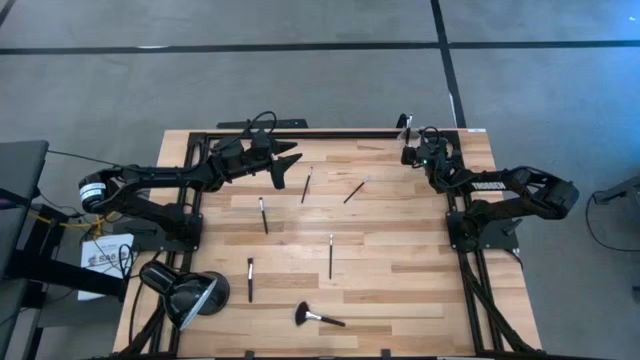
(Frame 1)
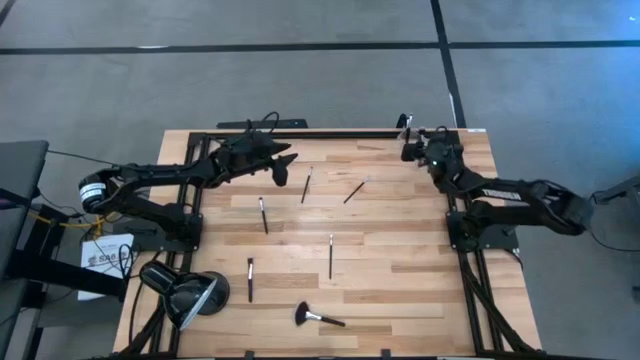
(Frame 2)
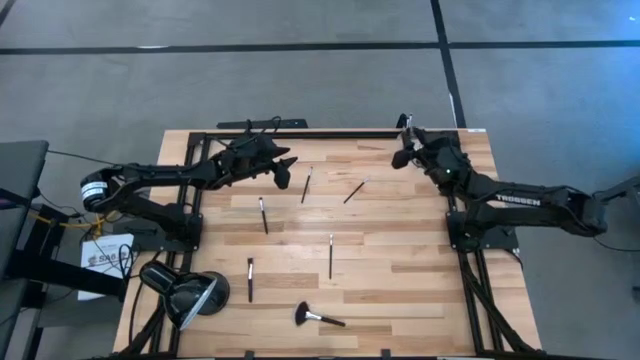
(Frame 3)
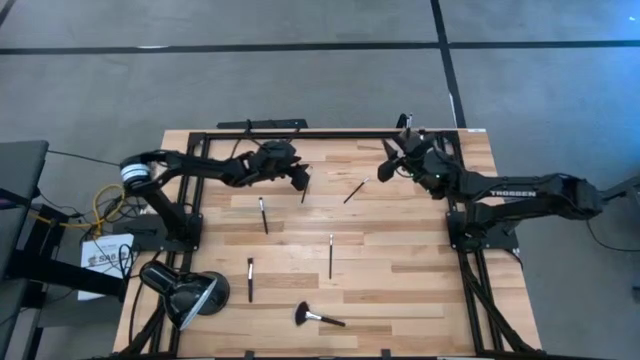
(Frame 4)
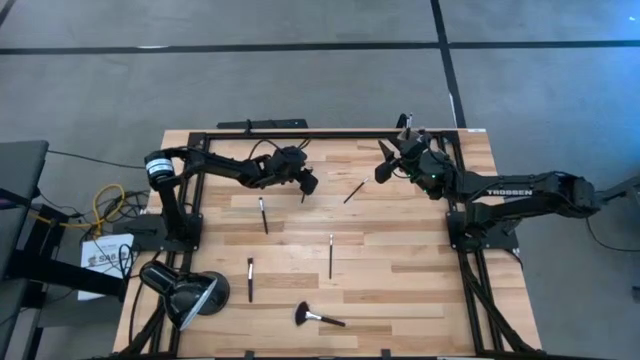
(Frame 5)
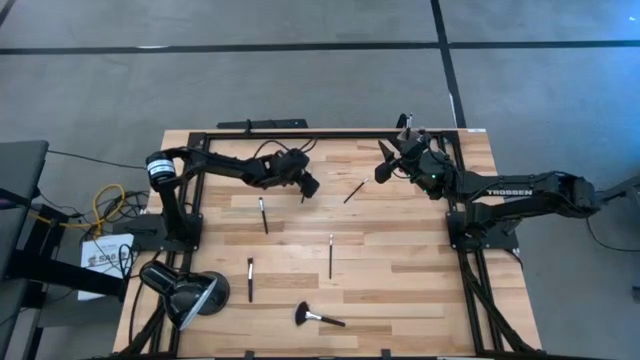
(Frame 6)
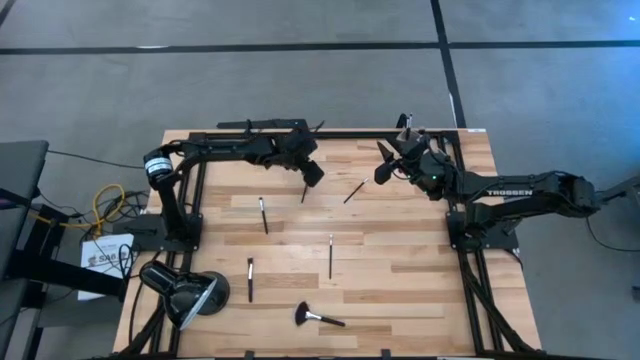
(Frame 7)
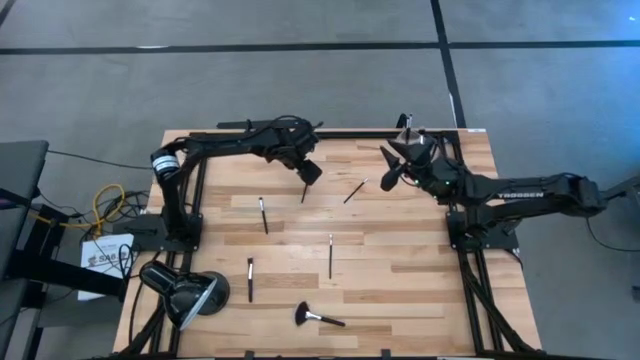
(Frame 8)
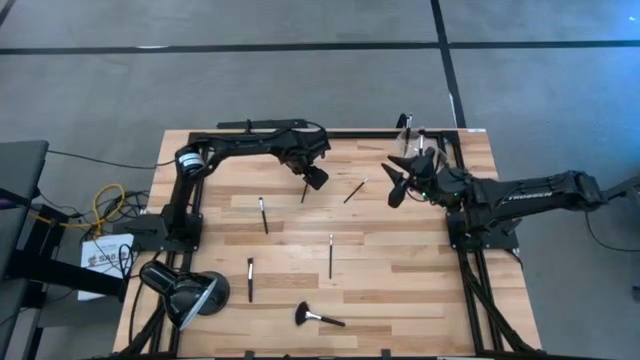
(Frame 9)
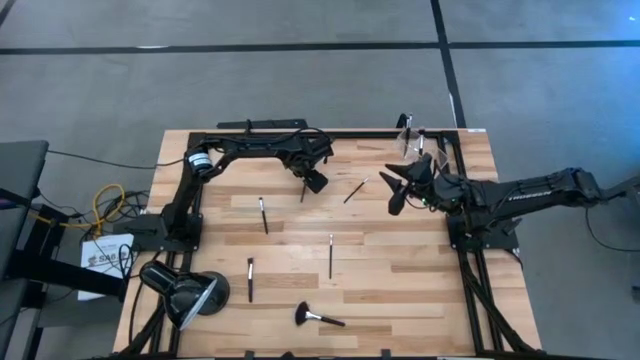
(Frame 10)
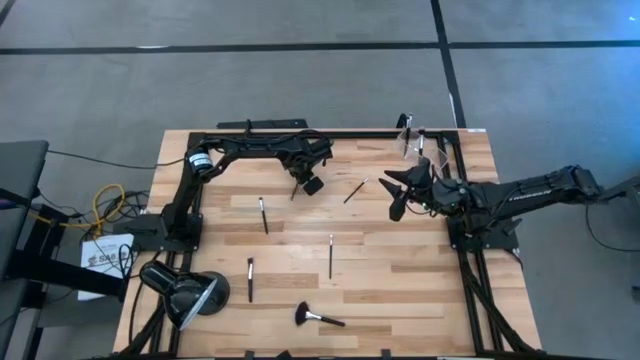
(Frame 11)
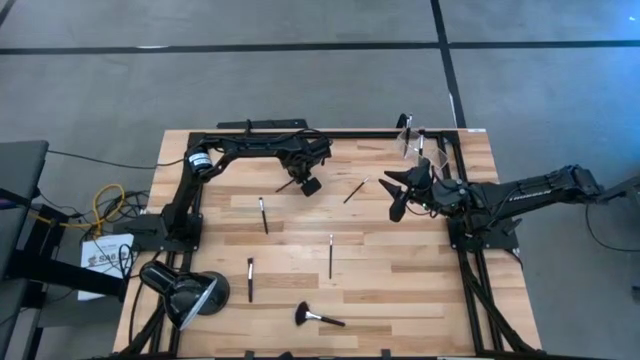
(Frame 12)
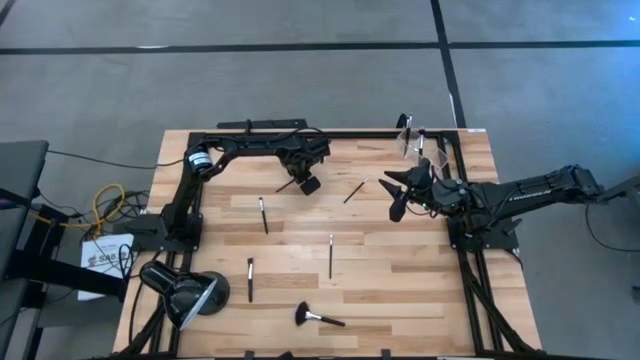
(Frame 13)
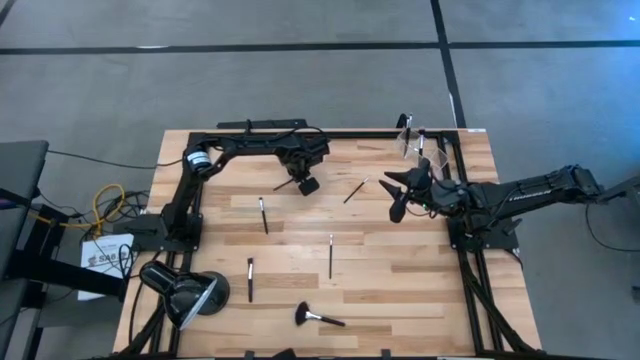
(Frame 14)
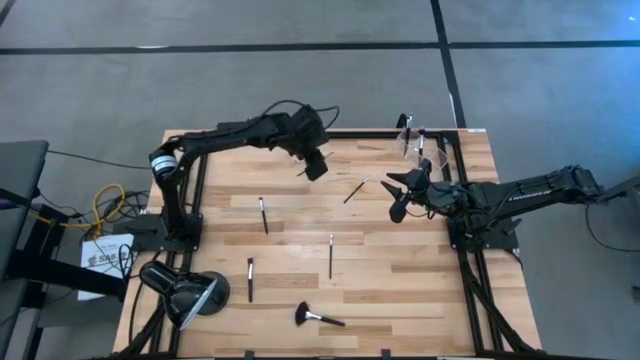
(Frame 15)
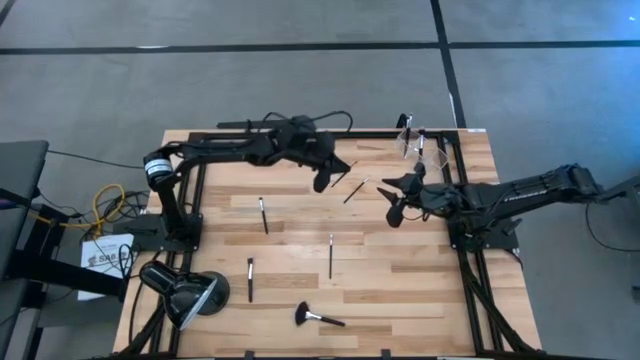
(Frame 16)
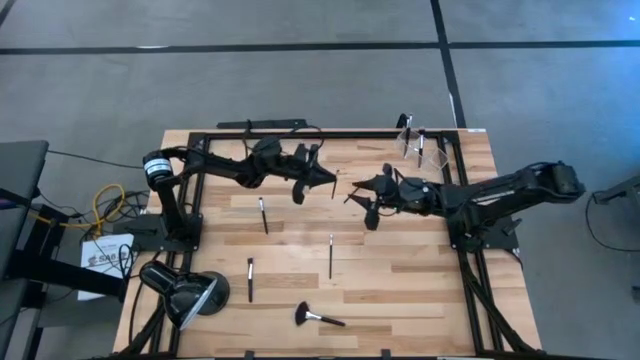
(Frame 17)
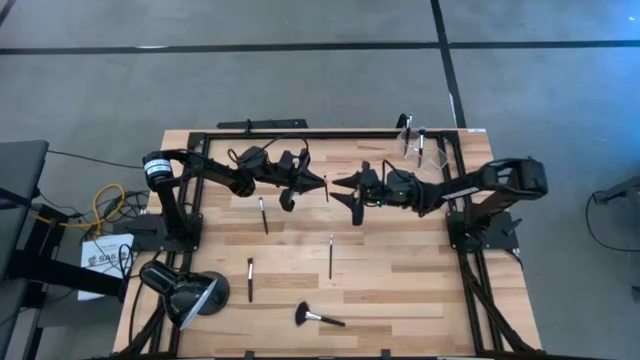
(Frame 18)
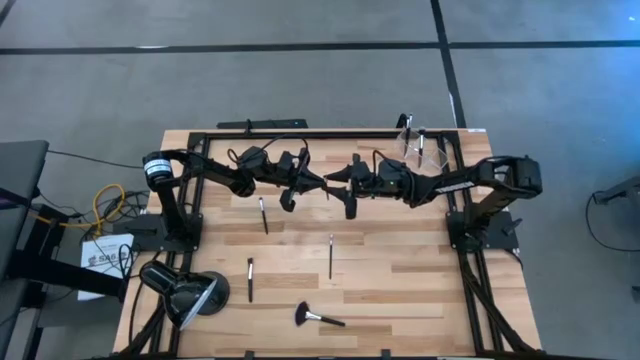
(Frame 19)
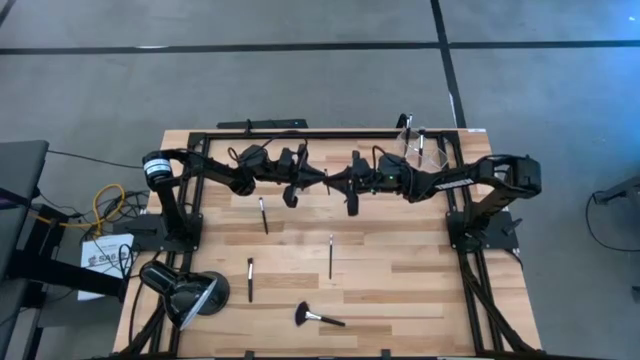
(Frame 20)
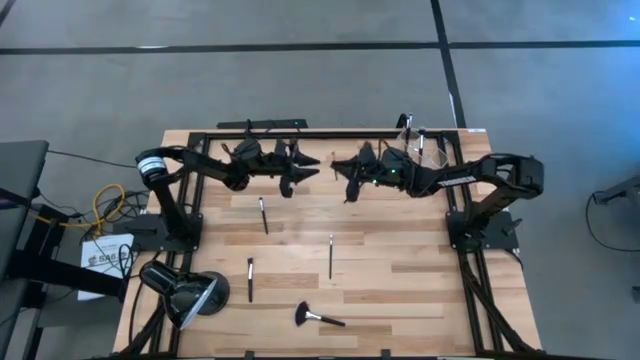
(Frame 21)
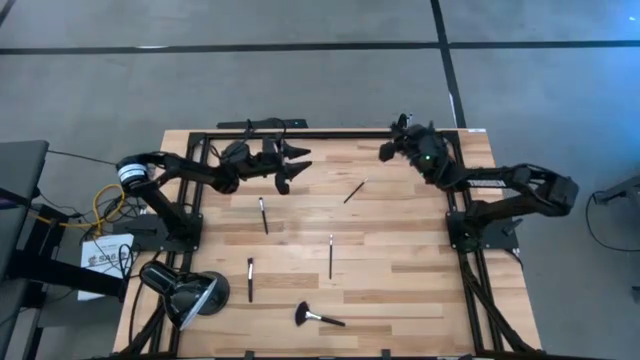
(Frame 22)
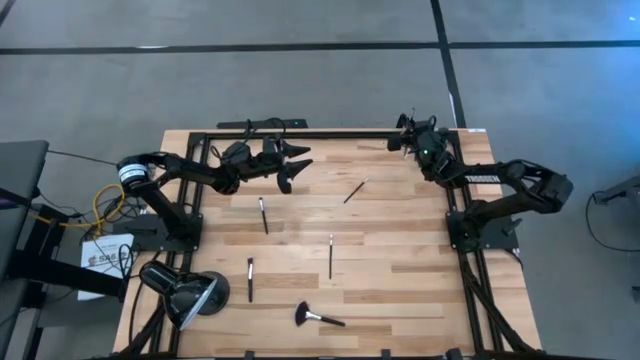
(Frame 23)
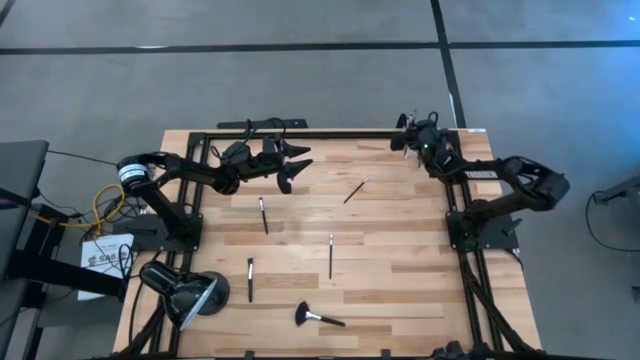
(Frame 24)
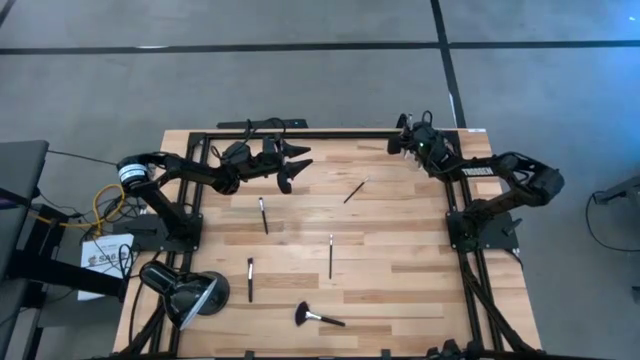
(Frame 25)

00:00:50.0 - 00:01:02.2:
Task: Put items in baskets/containers
Put the black eyeshadow brush into the transparent organizer

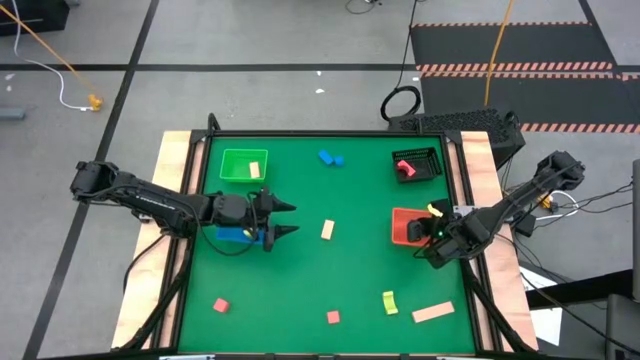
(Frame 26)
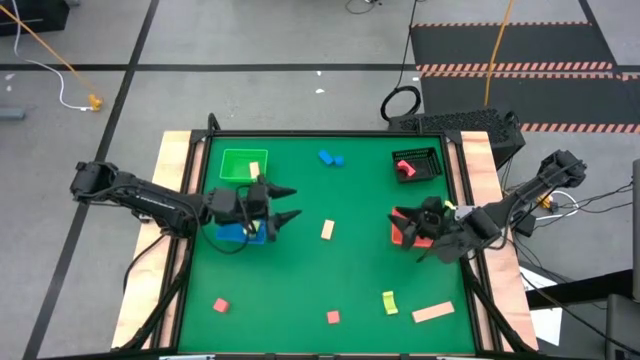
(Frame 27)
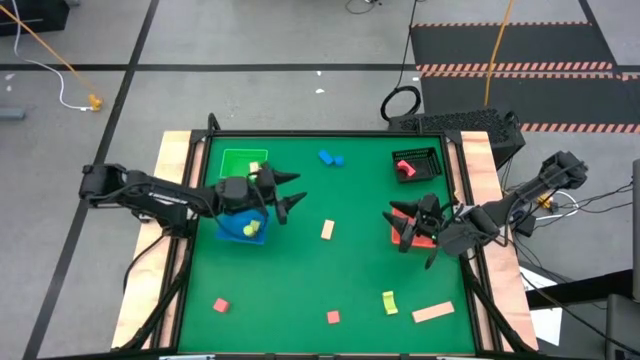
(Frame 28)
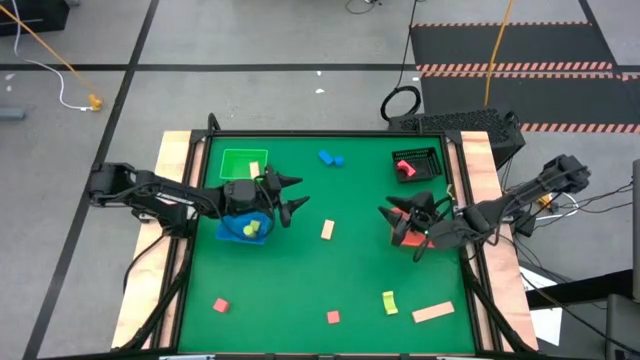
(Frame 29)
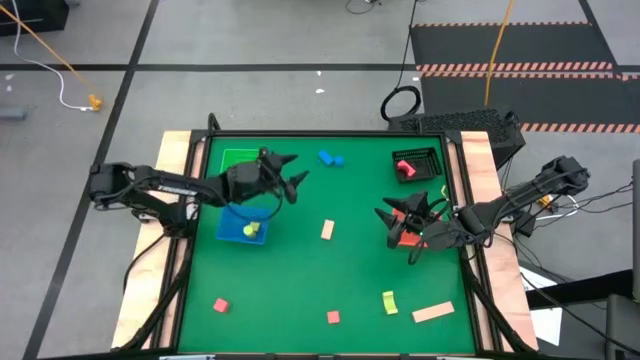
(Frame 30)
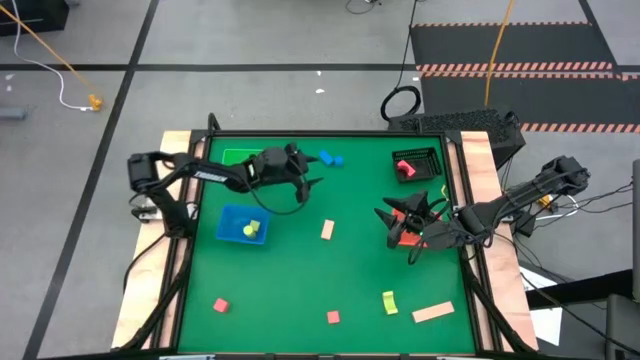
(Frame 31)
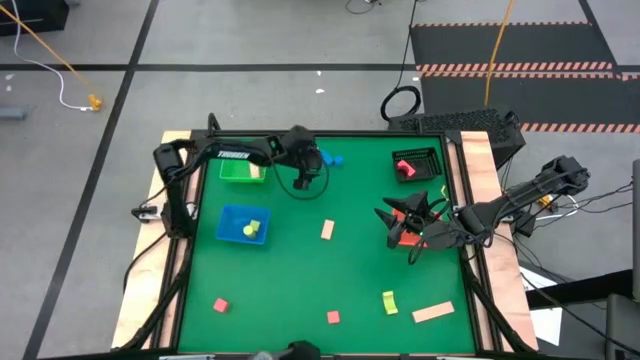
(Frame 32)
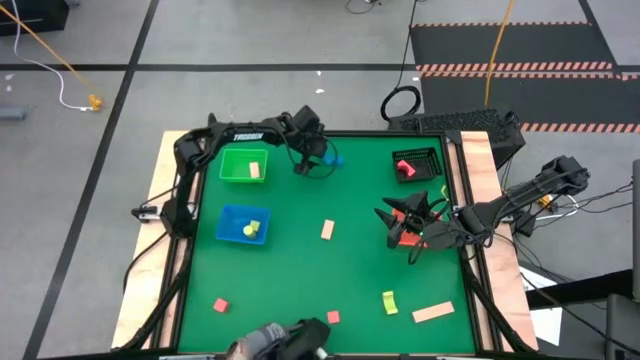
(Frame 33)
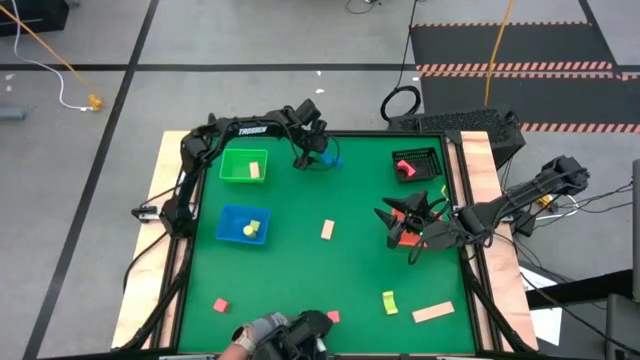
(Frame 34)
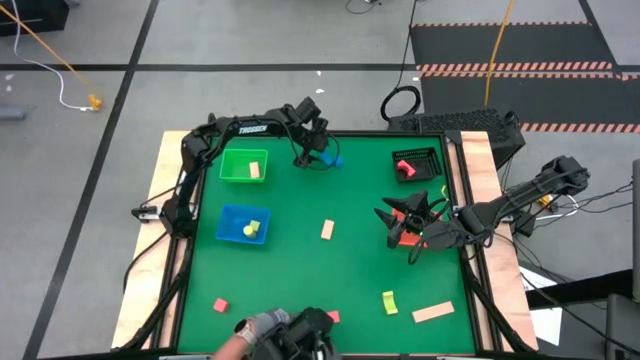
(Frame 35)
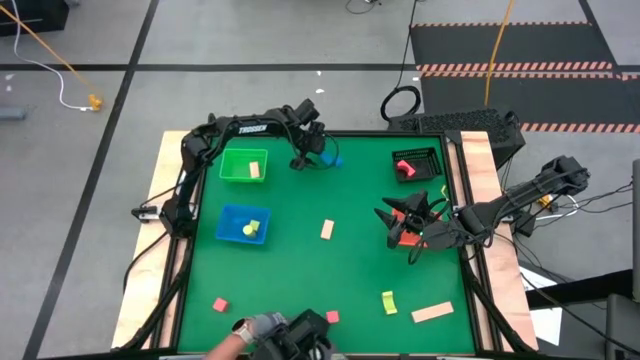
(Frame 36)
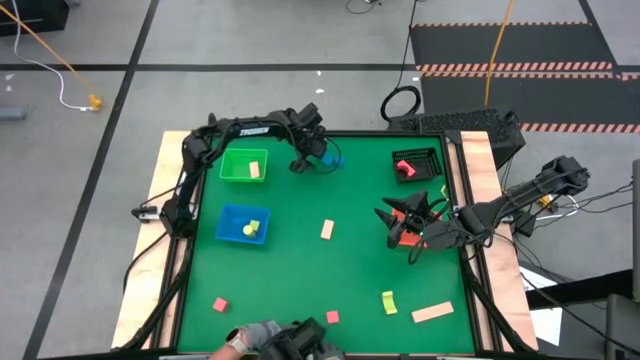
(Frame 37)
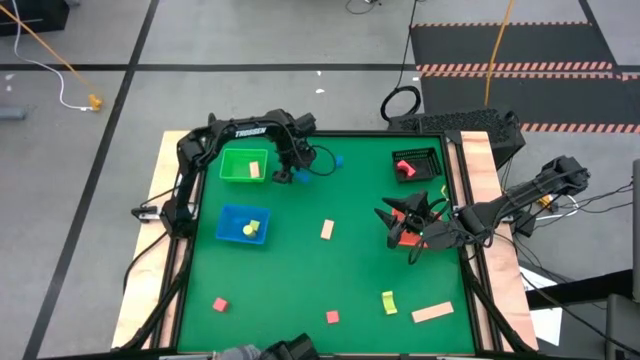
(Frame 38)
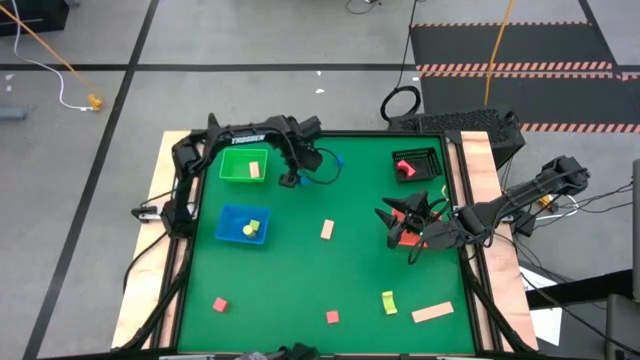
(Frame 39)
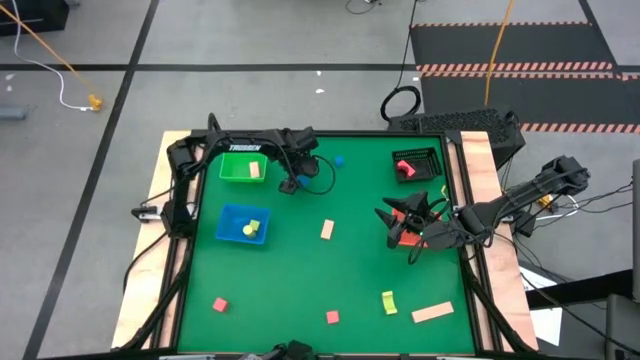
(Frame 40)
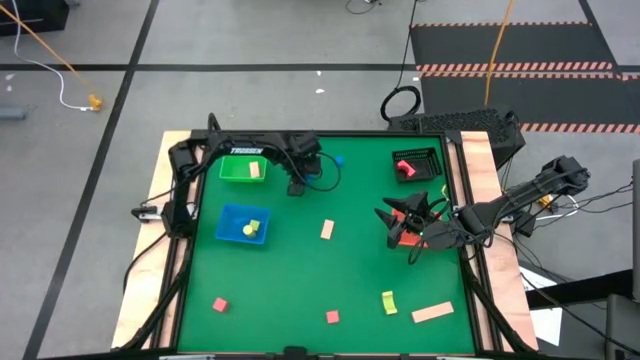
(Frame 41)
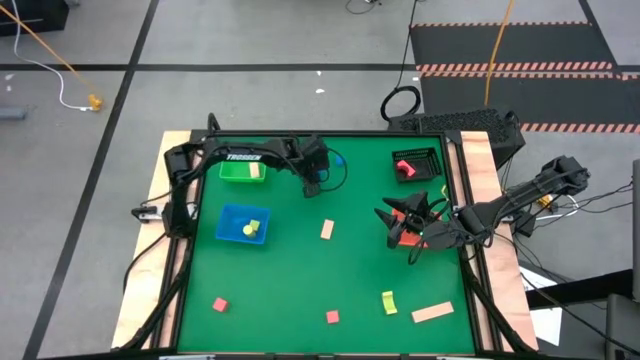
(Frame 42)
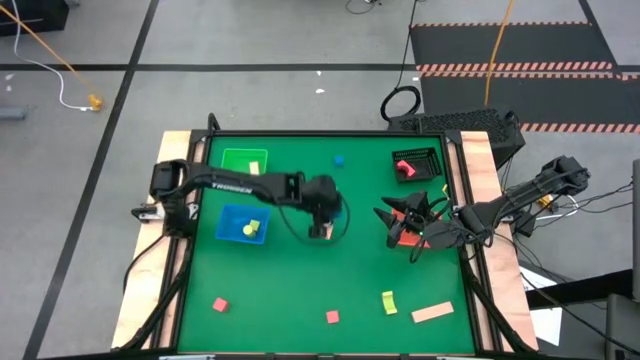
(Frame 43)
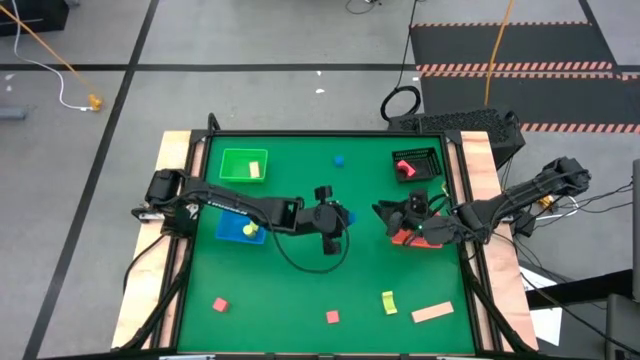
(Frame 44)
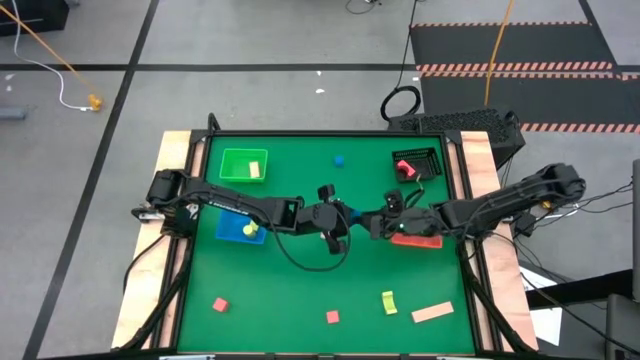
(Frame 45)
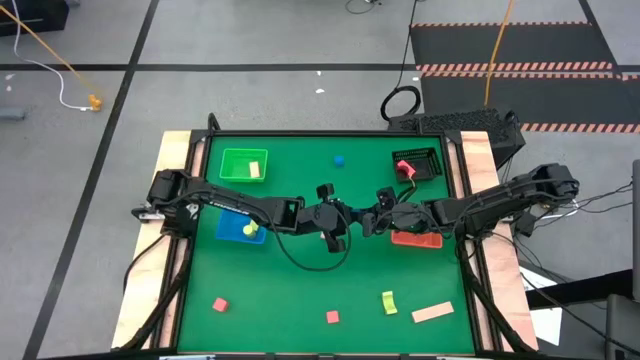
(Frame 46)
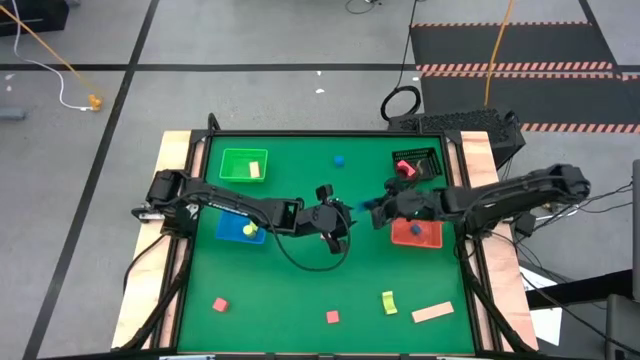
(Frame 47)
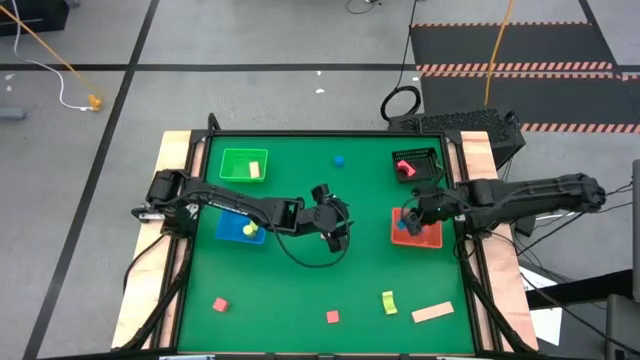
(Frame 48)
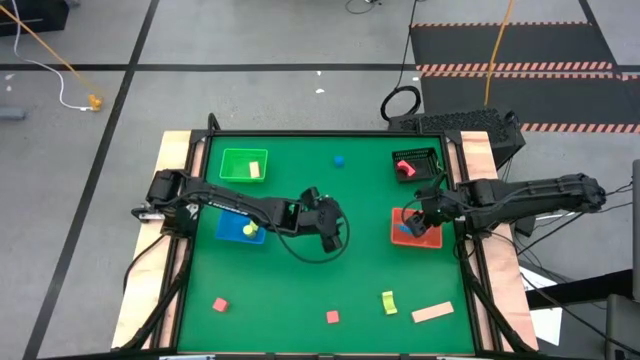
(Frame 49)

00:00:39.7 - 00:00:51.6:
Task: Sort & place blocks by color
Put the left blue block into the orange bin
